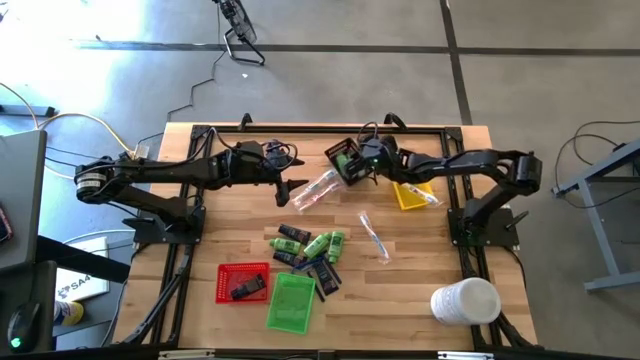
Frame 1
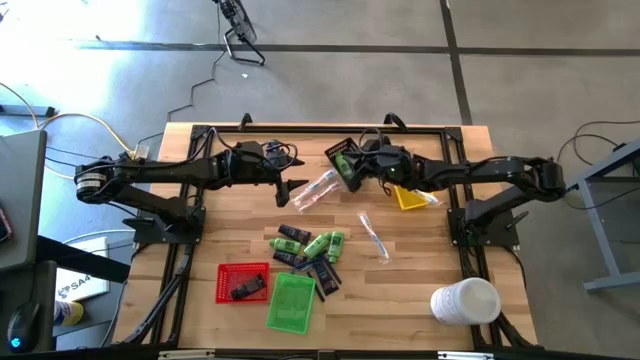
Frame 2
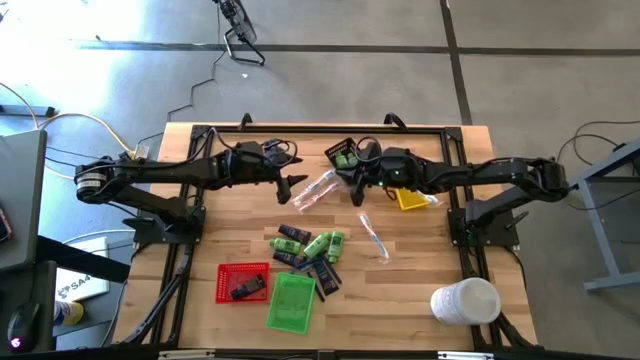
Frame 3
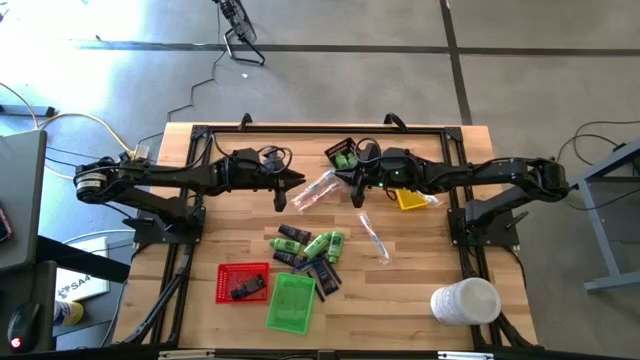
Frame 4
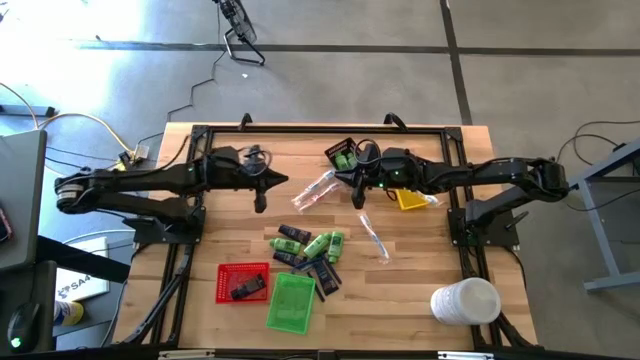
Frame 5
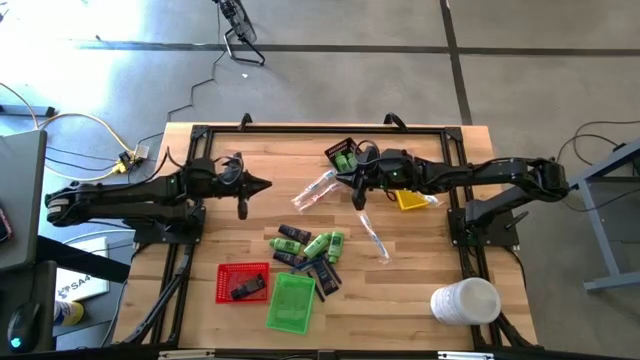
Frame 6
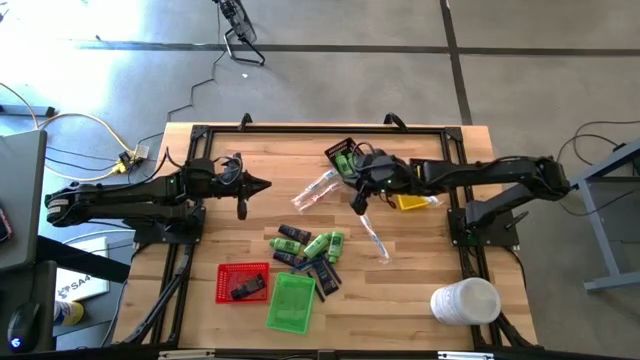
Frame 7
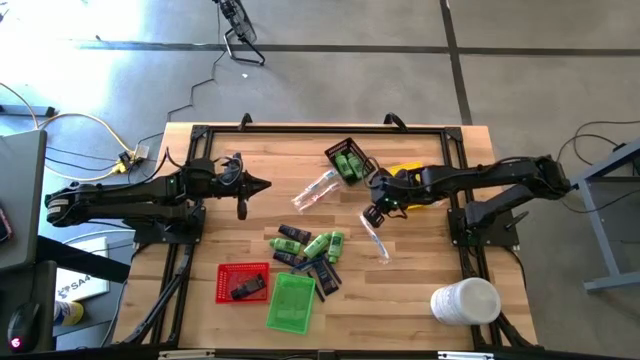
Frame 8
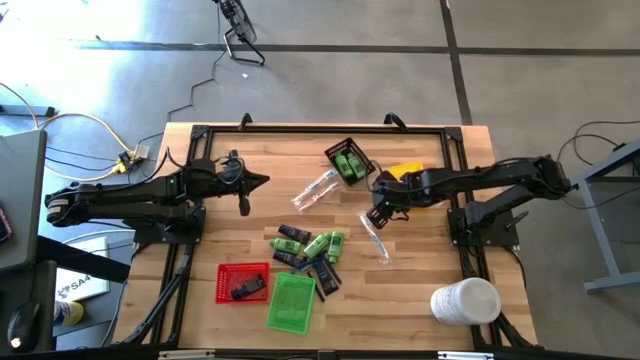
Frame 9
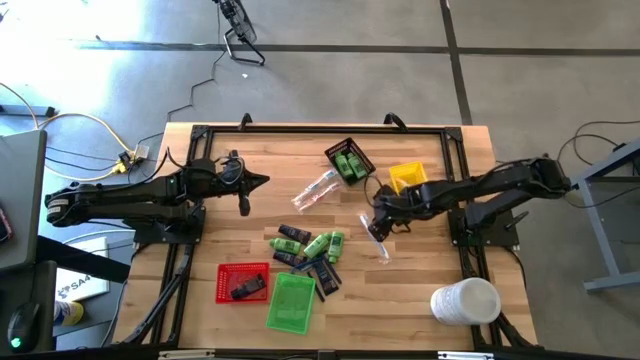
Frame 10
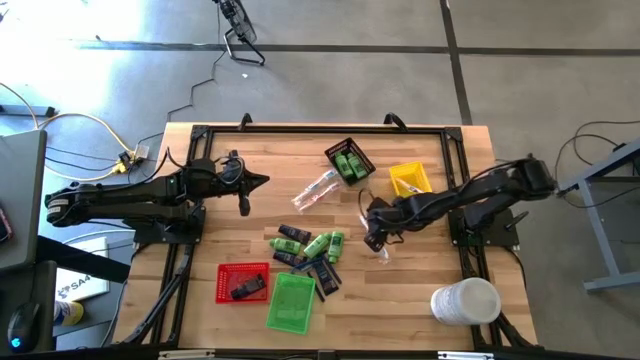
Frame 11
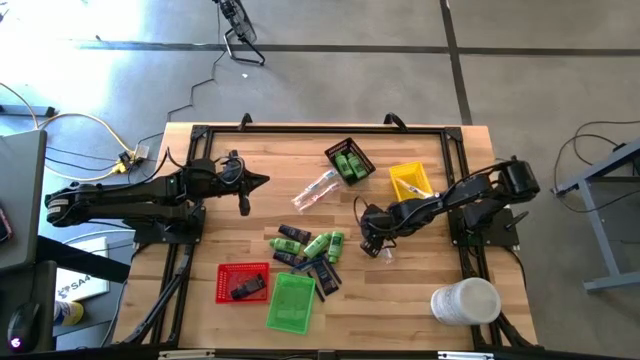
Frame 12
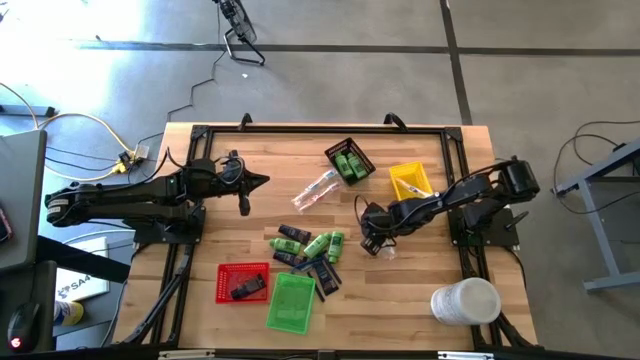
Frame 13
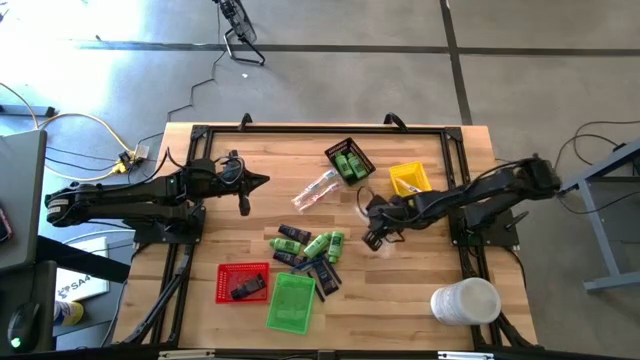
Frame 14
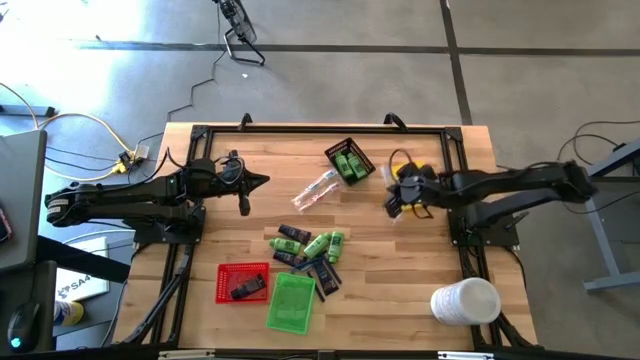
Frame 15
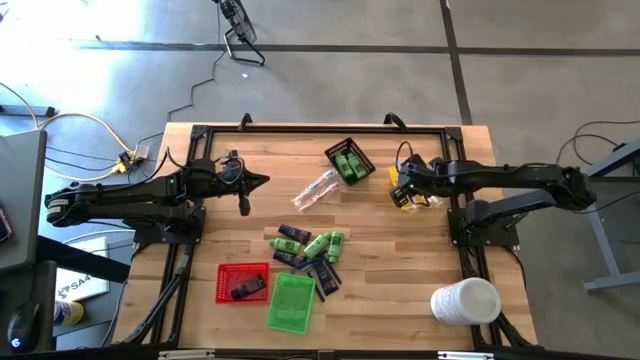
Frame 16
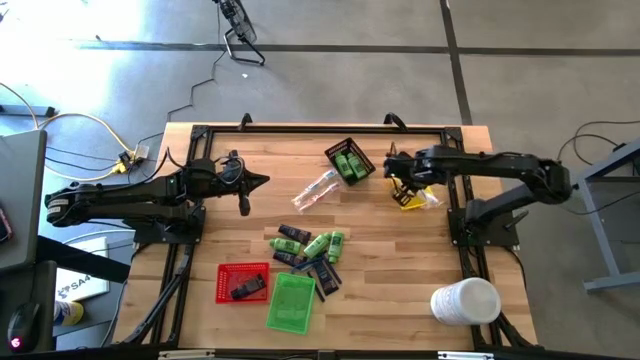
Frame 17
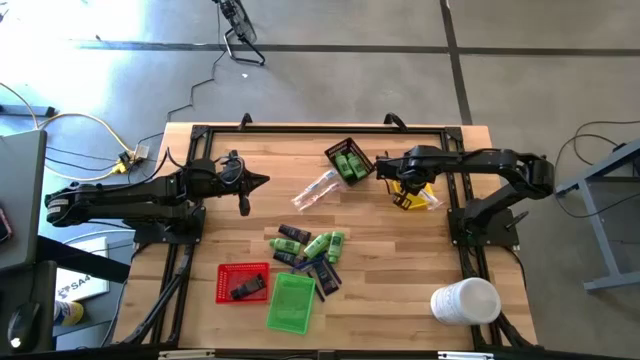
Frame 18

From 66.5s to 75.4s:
Task: Pick & Place Travel size toiletries
Put the right blue toothbrush into the yellow bin

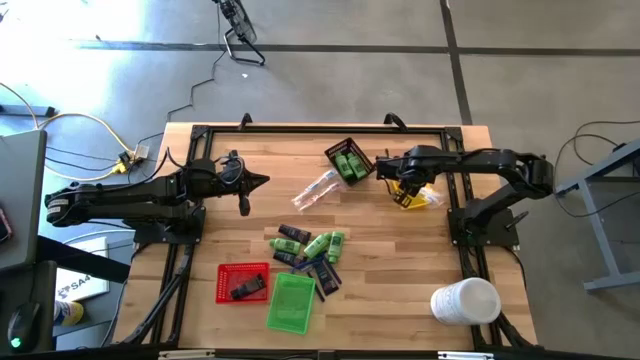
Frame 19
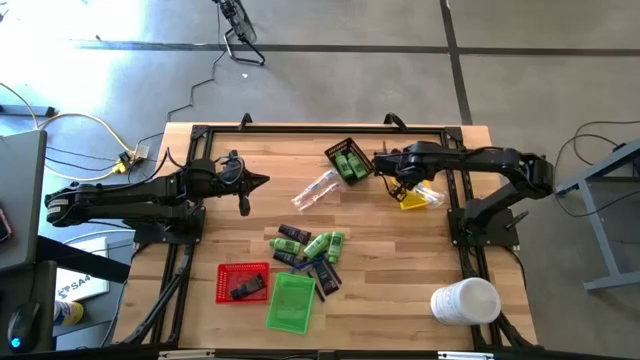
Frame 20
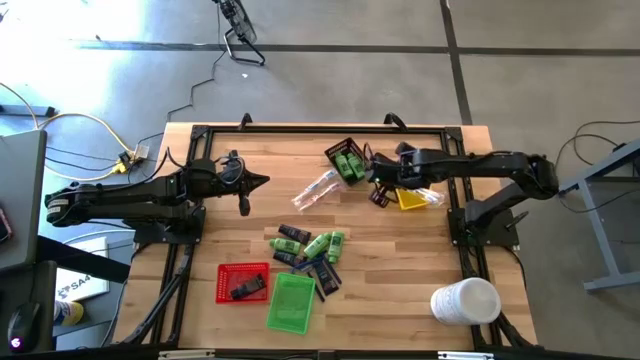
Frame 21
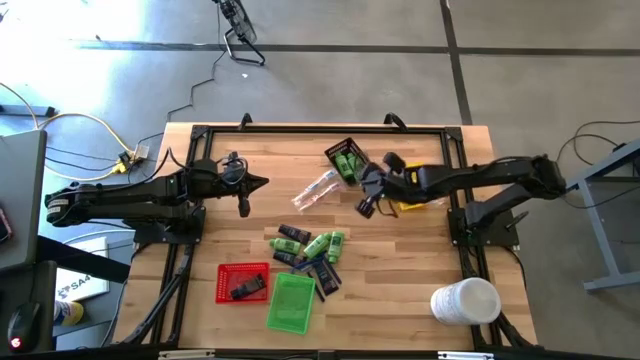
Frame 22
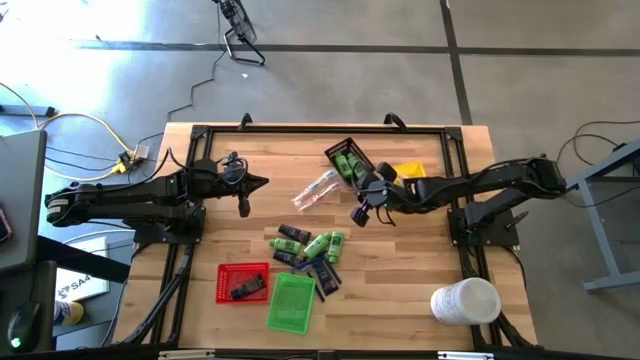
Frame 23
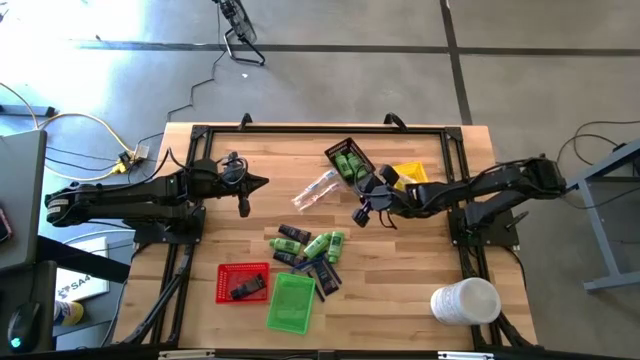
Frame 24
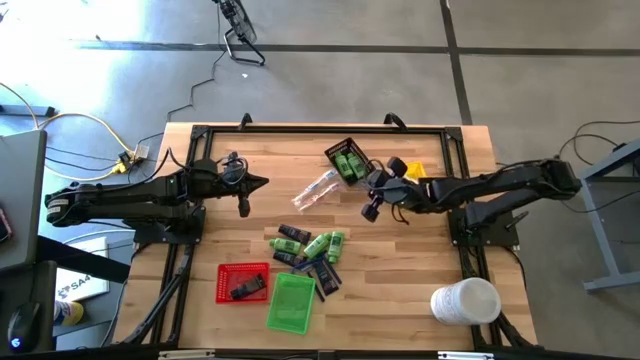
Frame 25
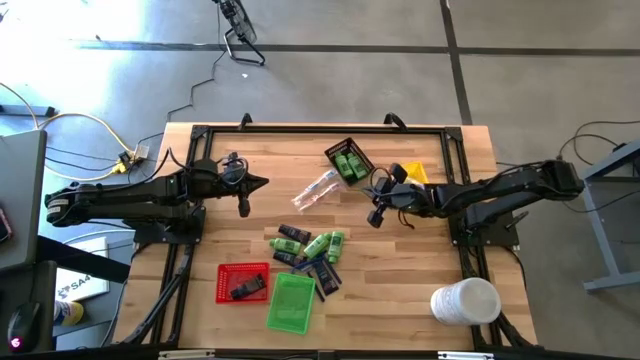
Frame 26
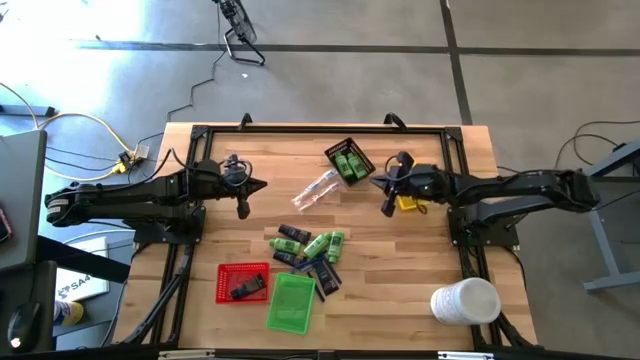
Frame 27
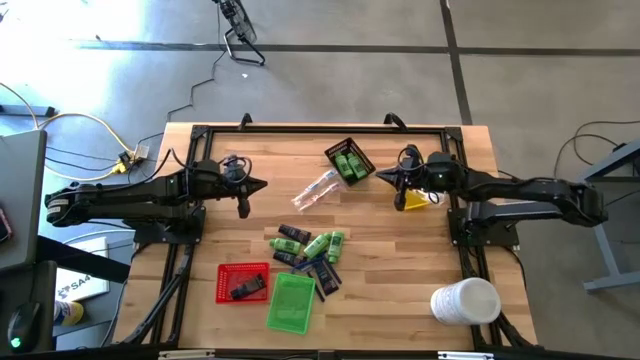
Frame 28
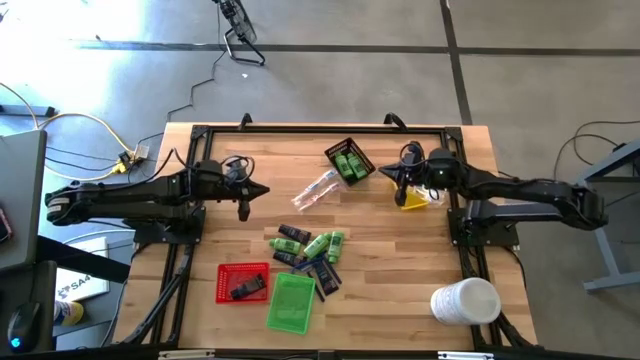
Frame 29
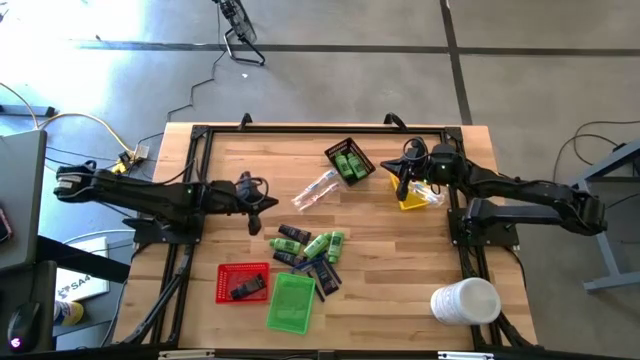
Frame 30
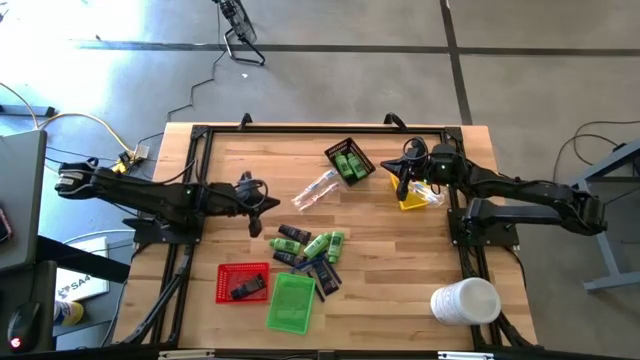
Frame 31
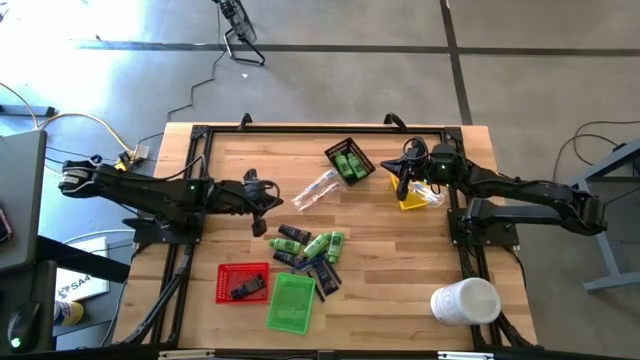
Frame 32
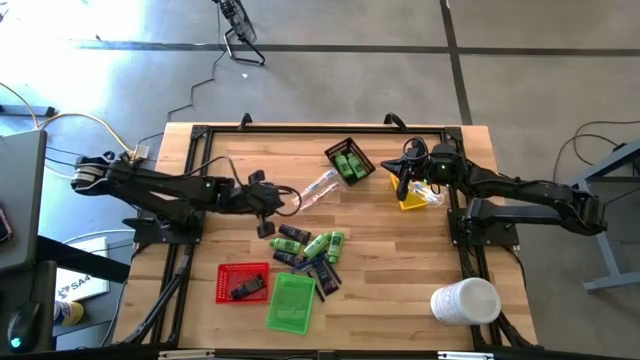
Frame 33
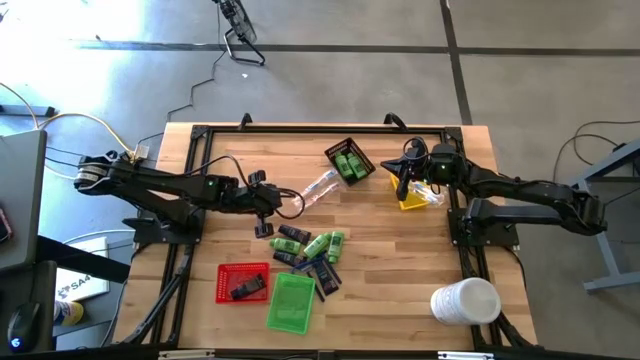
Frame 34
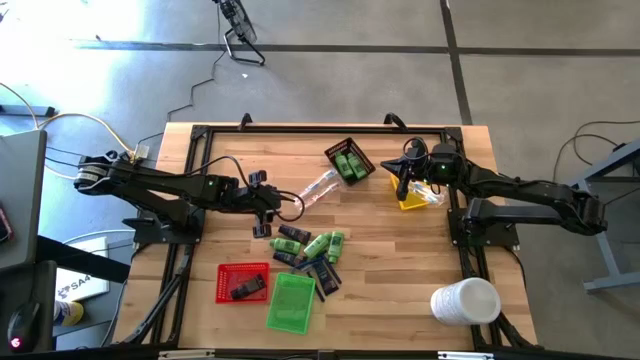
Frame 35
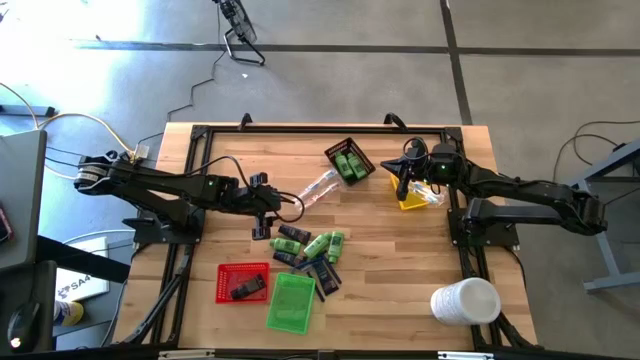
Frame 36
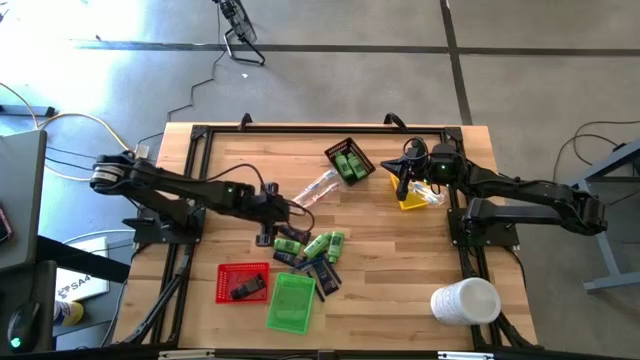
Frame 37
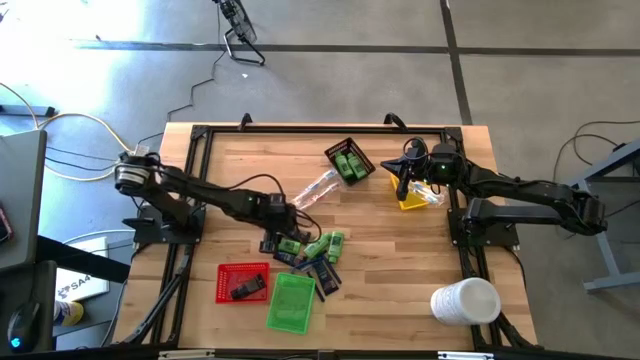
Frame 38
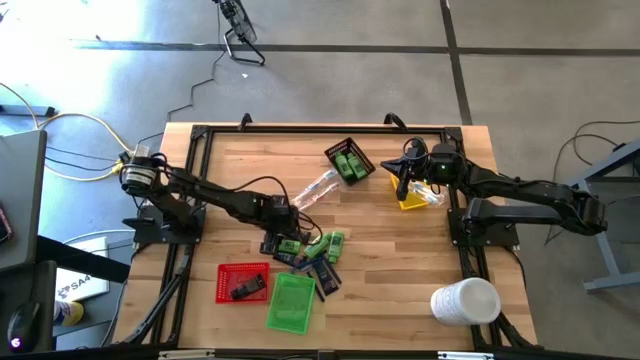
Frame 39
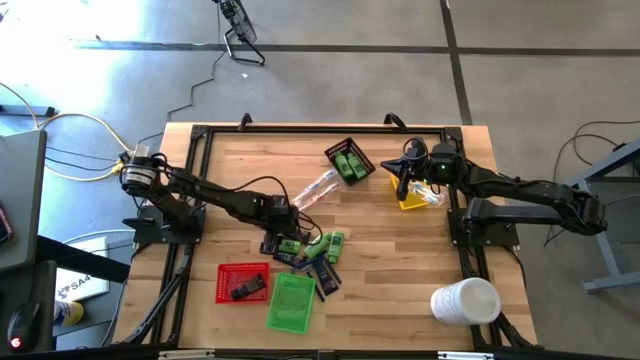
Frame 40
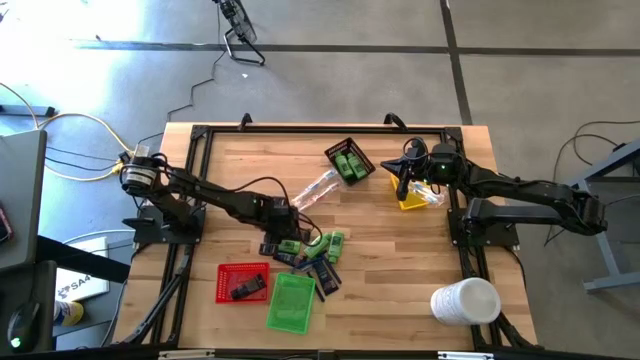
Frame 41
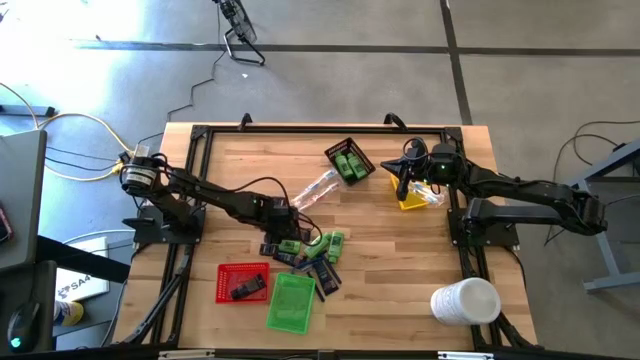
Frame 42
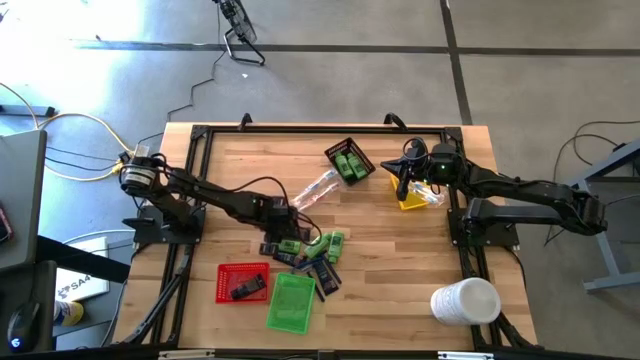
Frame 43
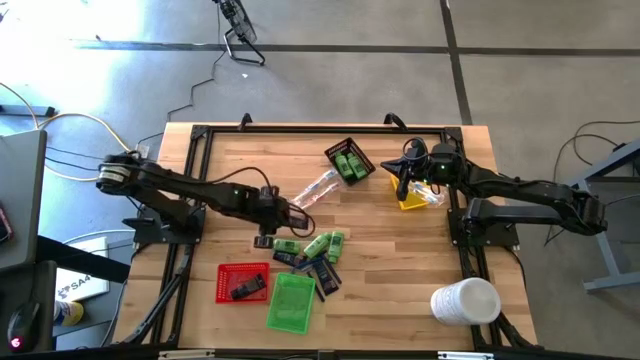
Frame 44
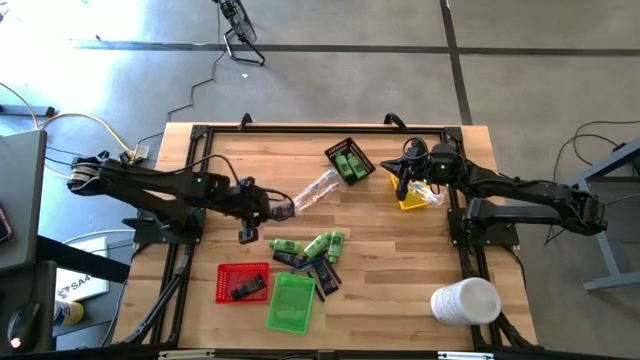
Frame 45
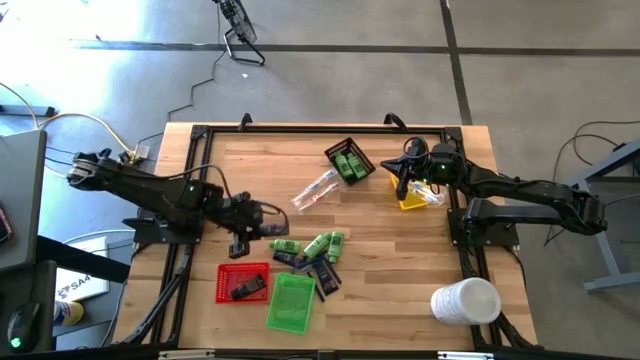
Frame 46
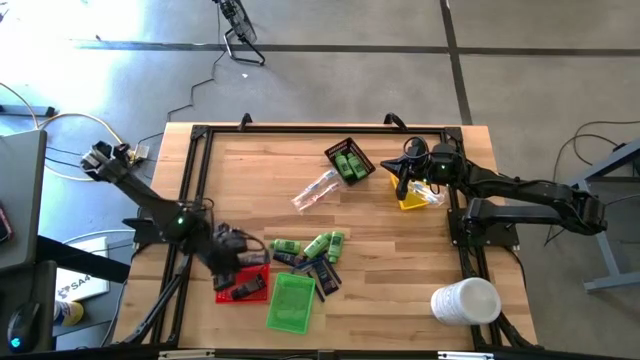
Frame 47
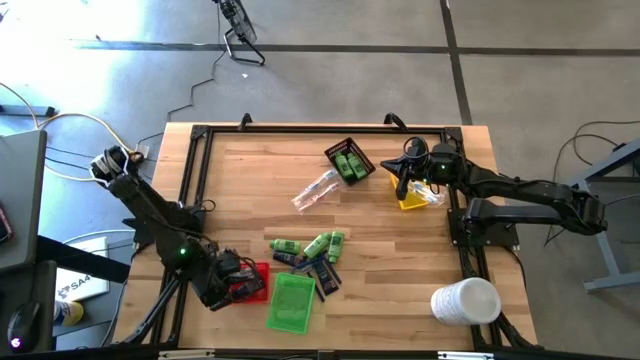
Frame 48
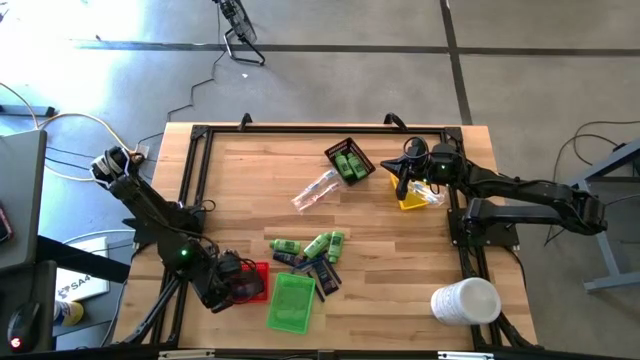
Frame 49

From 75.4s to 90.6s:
Put the shave cream into the red bin
